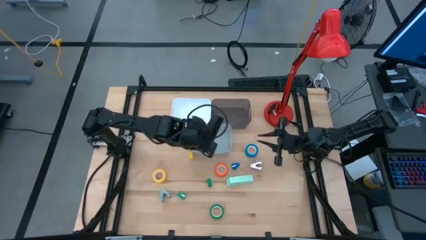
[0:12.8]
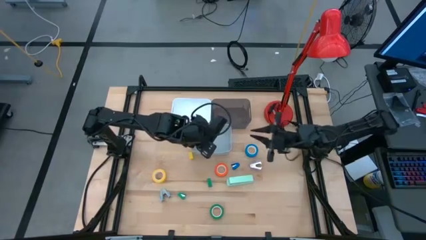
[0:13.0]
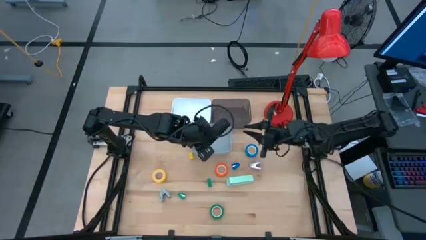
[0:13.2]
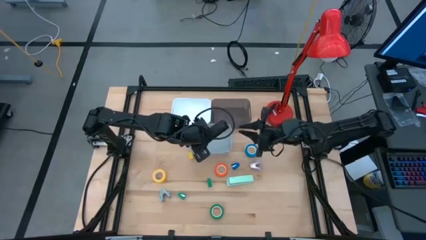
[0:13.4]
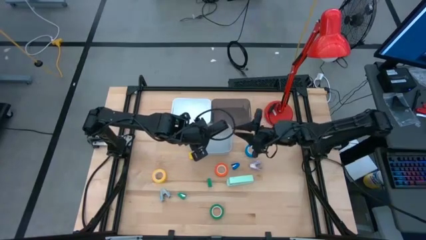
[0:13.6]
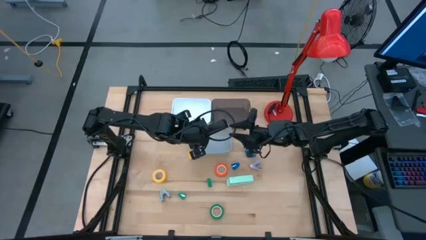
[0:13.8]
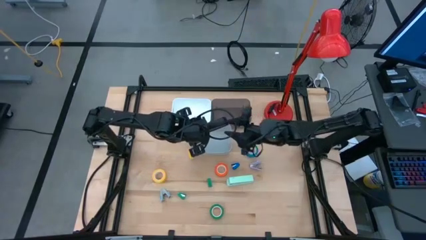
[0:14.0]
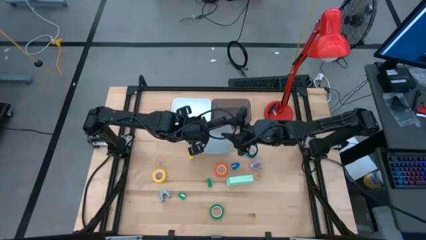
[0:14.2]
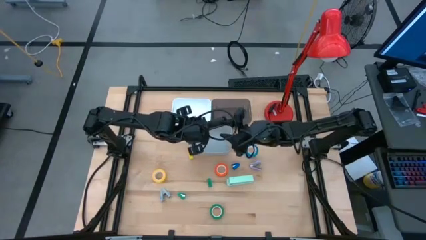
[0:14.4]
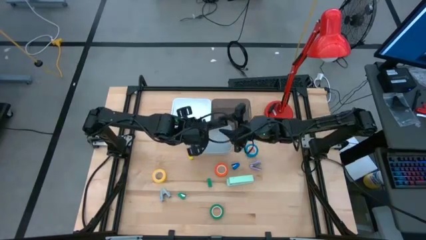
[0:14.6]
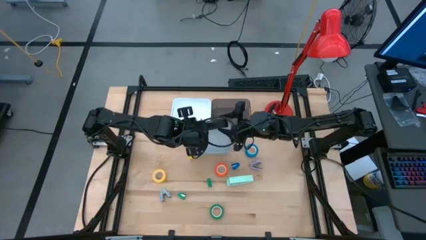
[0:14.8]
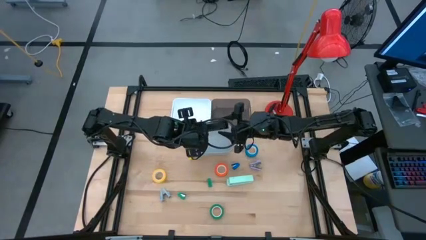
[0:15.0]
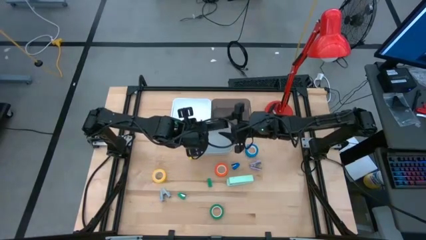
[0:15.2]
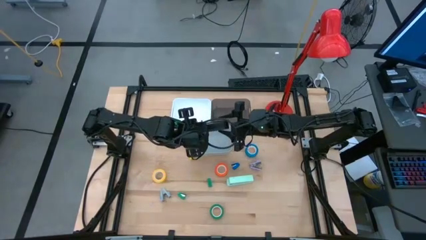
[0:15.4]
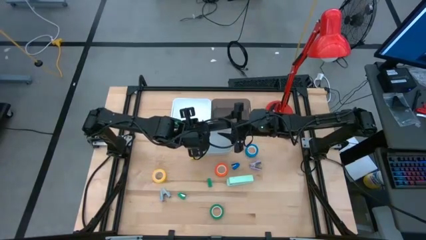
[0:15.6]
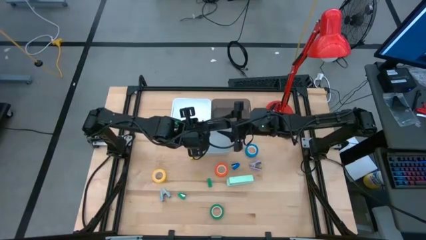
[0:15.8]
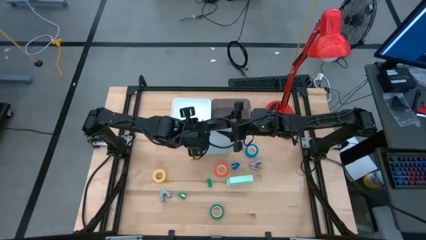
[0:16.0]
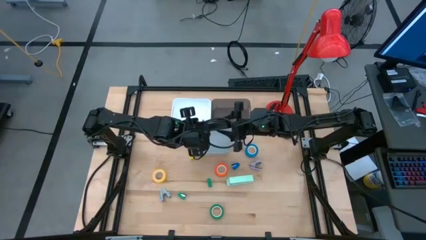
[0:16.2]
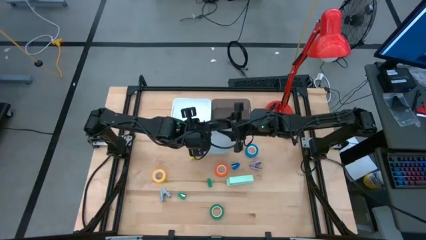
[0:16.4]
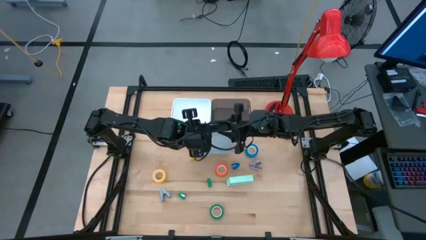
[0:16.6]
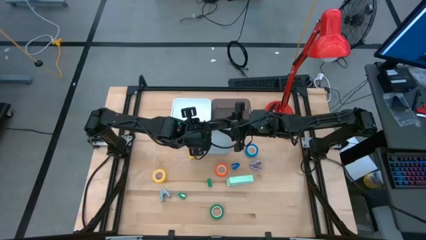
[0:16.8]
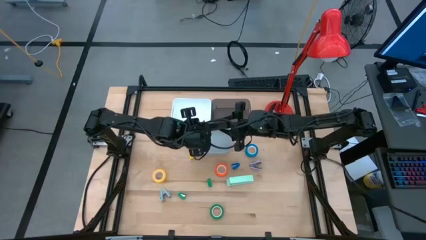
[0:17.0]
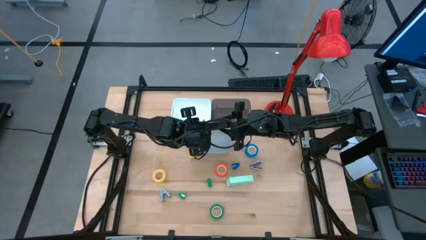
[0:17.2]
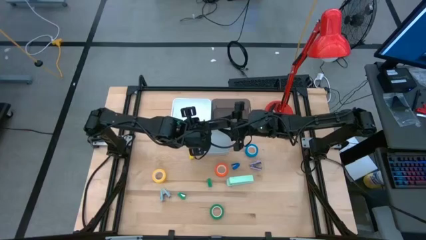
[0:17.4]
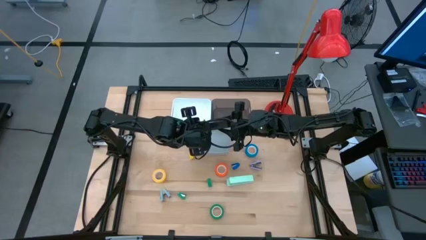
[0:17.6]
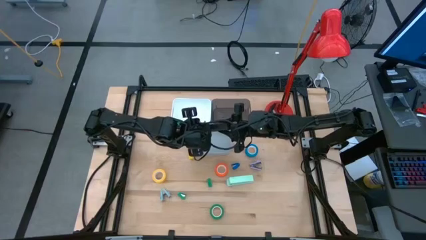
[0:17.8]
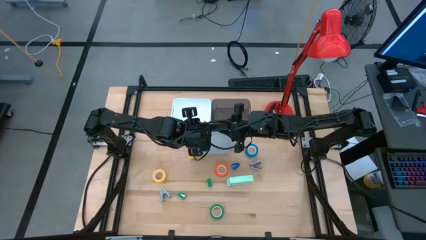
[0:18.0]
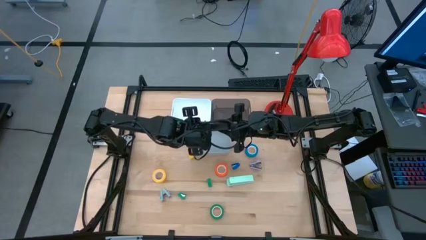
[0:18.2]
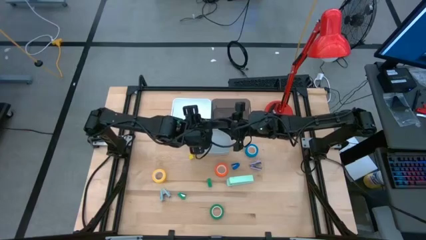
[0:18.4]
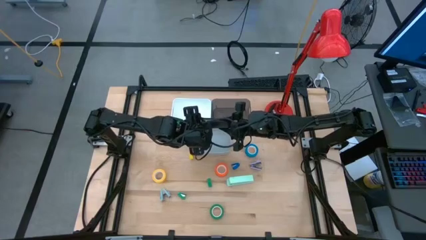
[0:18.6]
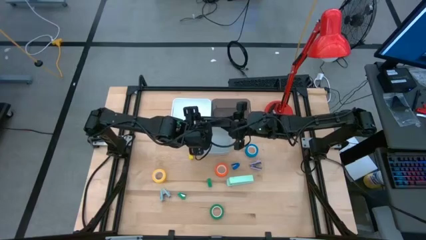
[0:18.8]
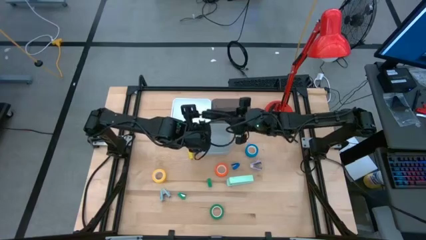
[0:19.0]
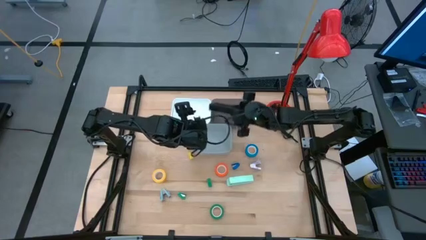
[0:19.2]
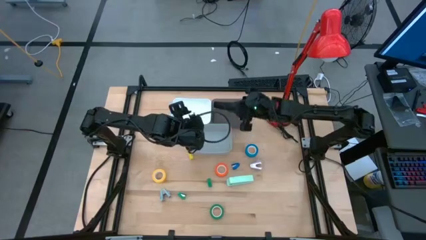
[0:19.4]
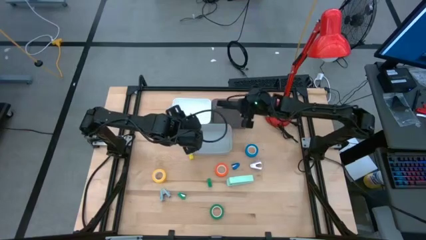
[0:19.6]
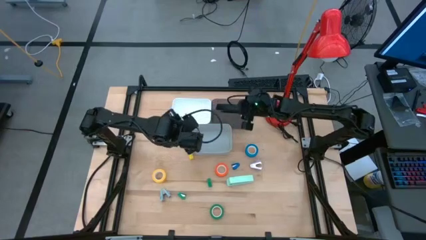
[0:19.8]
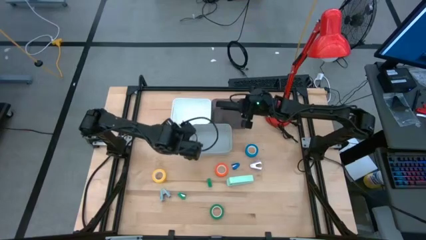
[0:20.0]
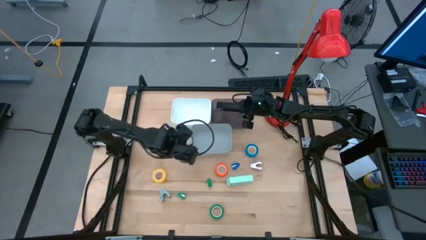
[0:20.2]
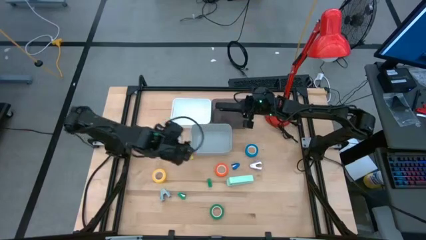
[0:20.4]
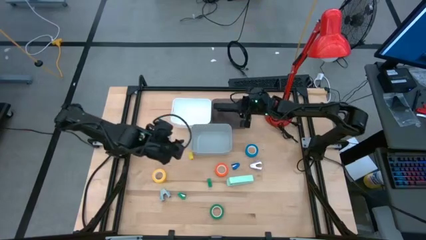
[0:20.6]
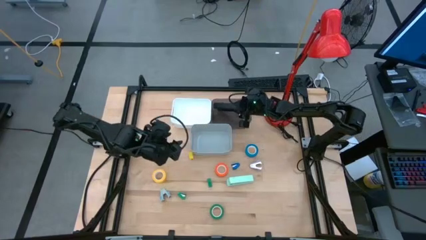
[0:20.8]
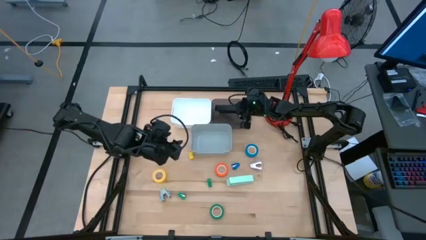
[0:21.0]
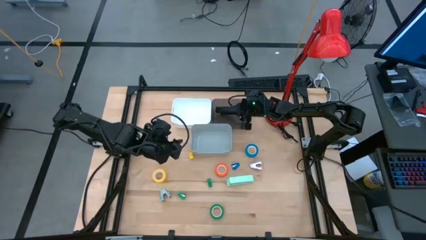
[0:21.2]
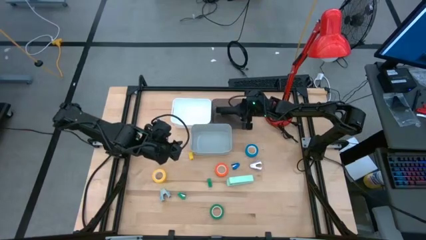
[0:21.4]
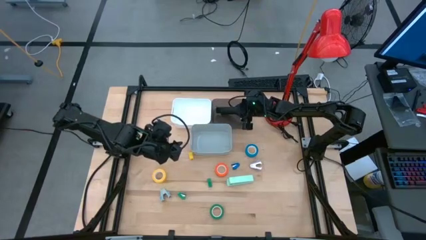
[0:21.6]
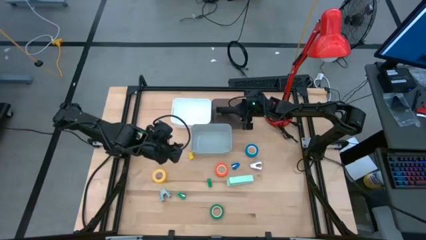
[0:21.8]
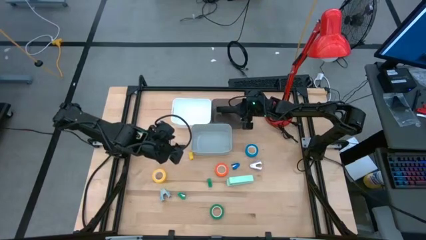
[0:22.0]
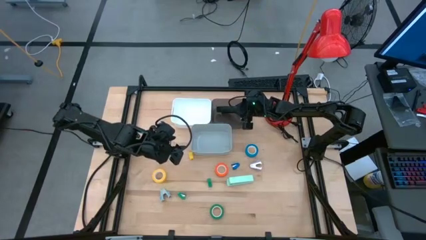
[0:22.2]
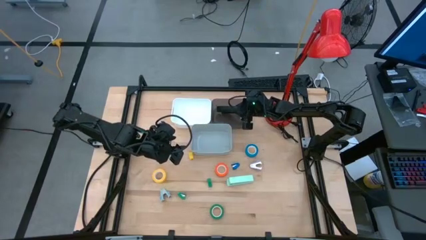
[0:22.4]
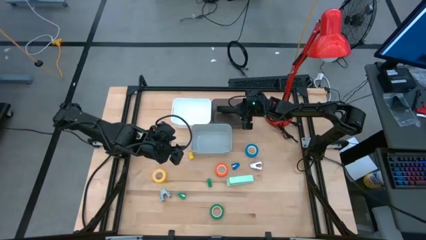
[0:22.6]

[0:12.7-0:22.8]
Task: Pick and place Stapler, Stapler remover, tape
Put the black stapler into the black bin

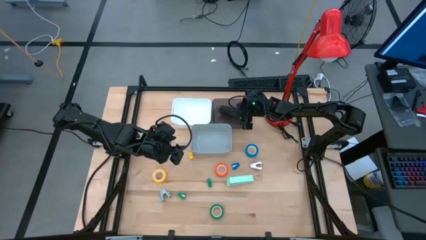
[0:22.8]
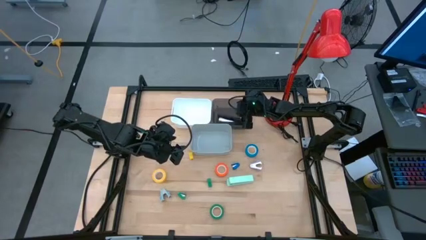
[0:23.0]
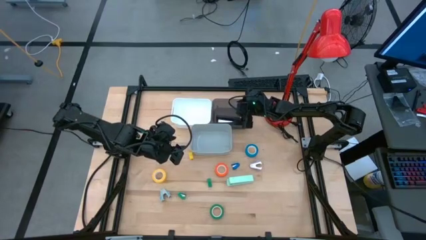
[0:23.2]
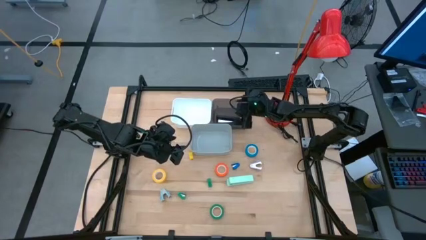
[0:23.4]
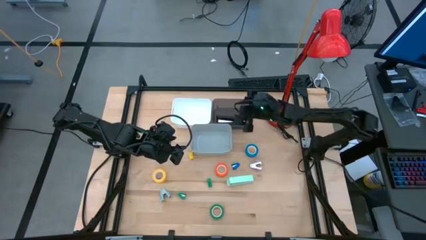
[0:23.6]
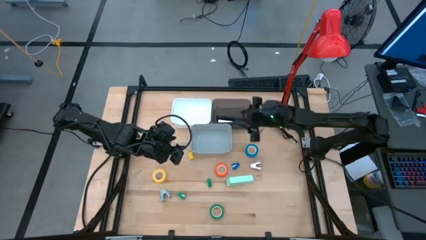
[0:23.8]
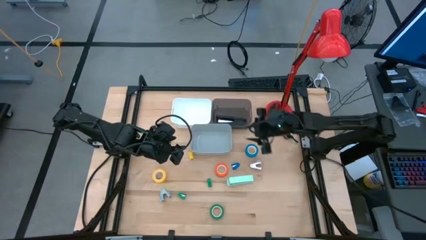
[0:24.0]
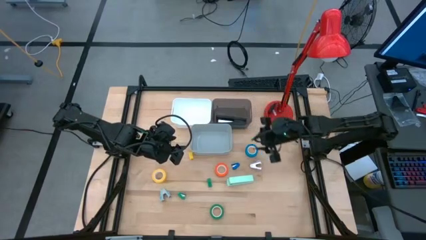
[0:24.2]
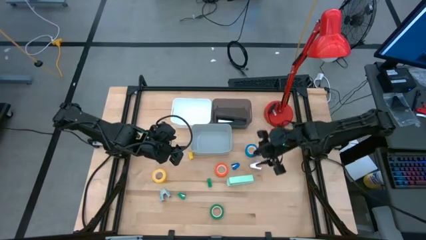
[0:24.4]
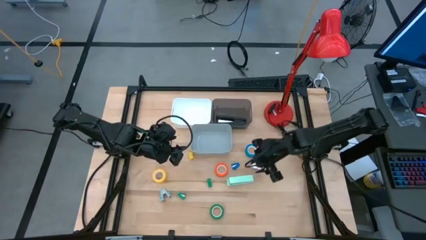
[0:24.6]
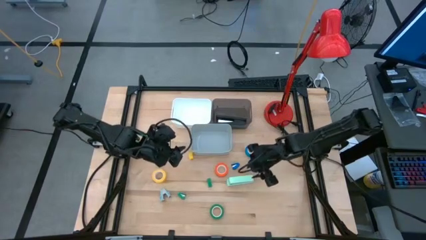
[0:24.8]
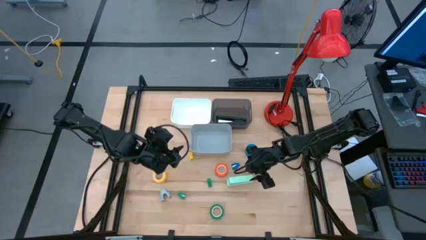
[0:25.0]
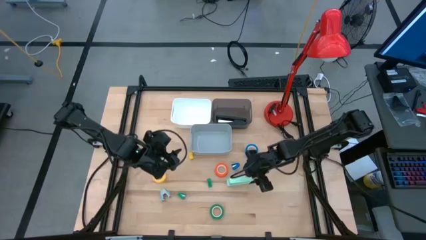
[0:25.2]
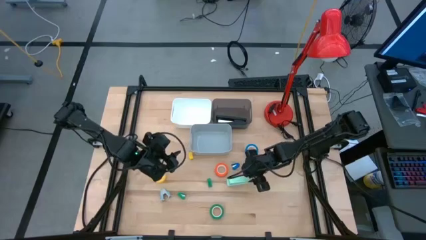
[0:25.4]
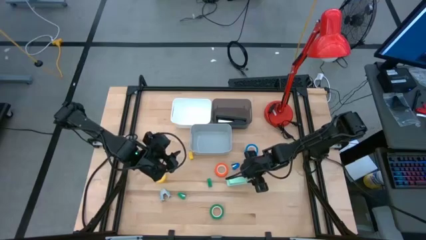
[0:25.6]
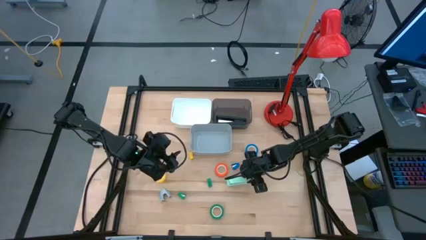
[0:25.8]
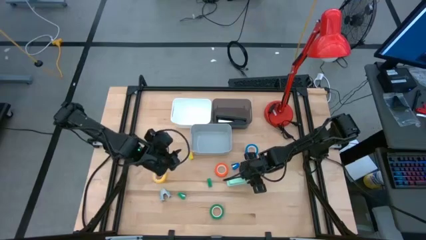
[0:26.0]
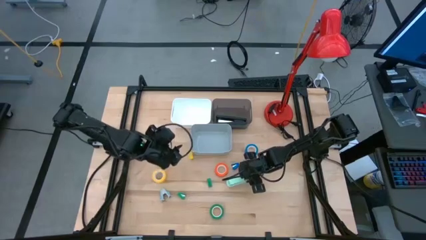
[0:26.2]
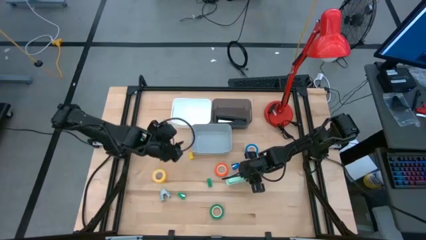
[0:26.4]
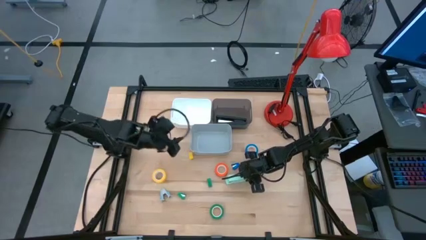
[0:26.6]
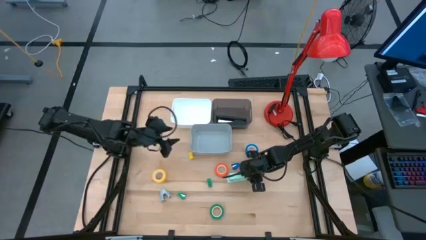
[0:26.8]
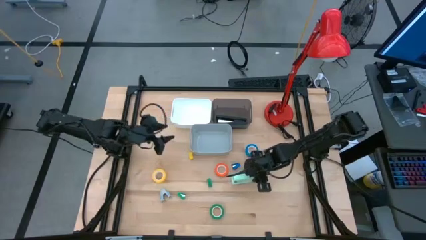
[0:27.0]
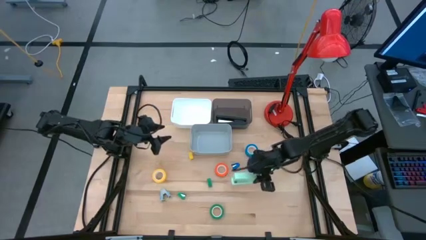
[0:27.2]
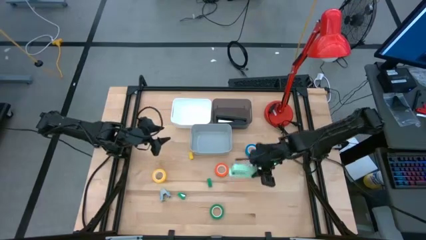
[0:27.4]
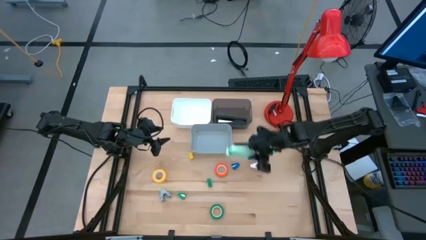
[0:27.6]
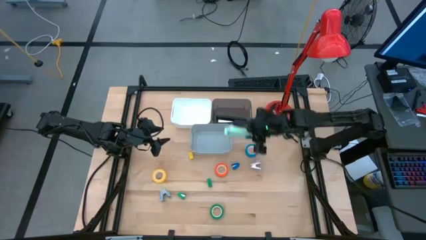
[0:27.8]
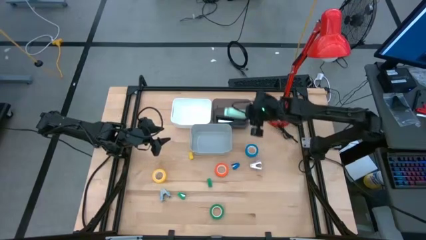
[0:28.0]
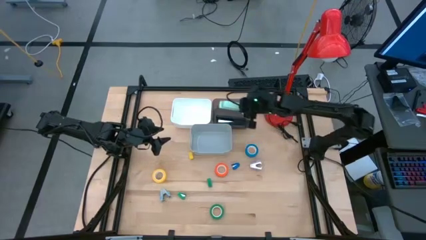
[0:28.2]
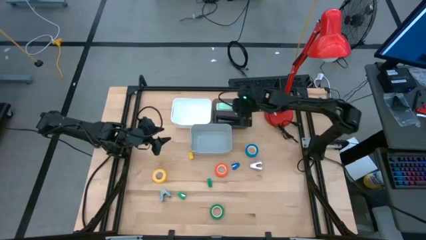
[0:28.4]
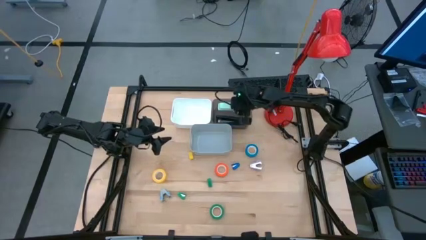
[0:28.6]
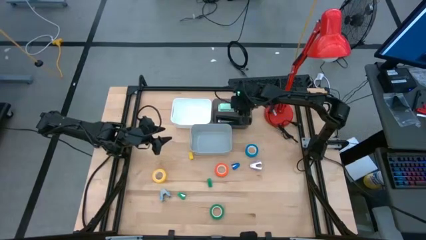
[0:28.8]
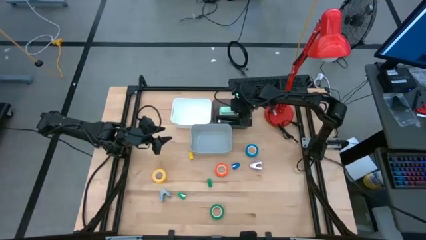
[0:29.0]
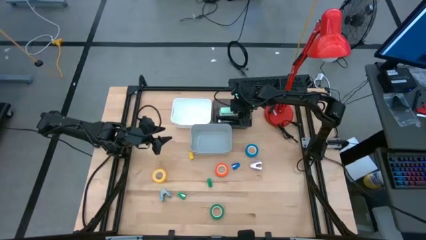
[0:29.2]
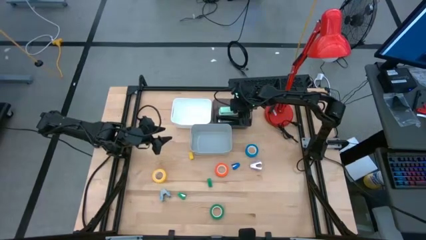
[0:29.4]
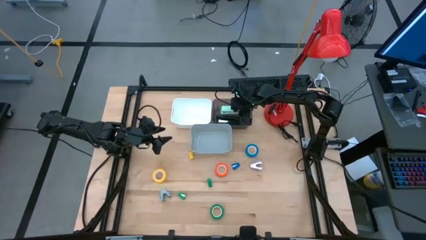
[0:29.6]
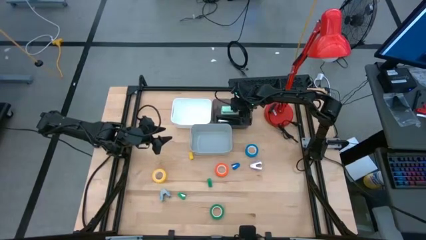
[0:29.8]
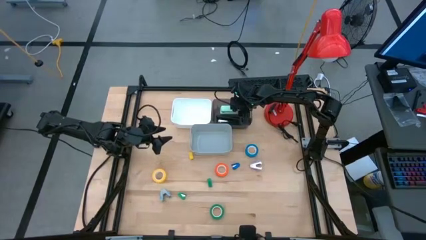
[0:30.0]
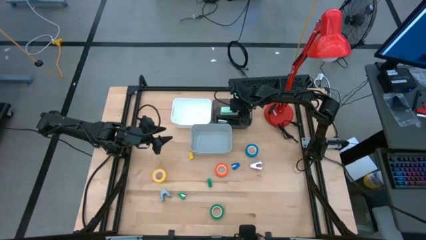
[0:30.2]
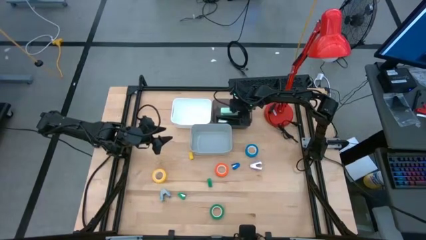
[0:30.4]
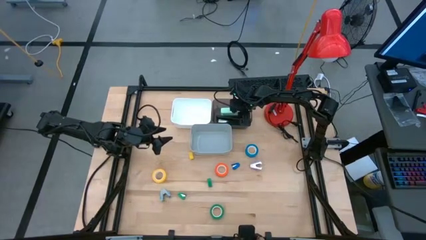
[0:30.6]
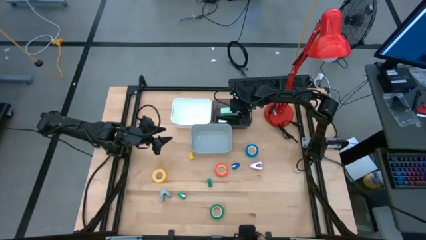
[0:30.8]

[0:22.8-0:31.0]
Put the light blue stapler into the black bin
